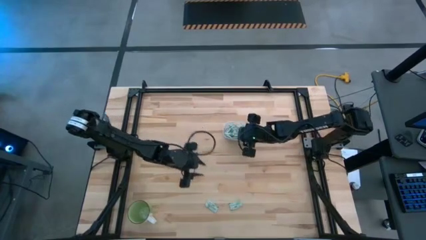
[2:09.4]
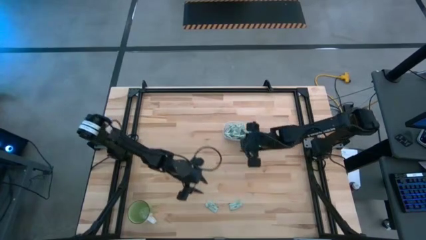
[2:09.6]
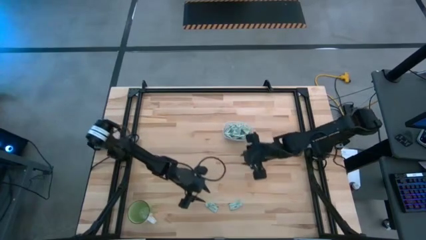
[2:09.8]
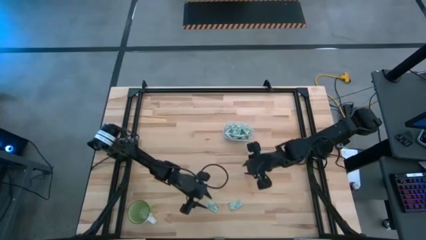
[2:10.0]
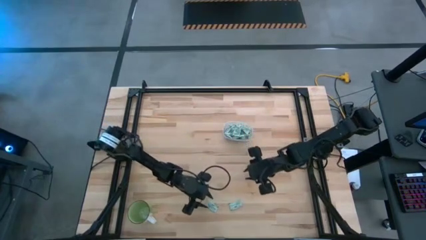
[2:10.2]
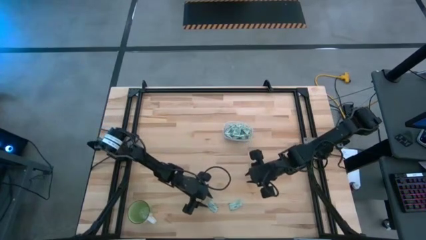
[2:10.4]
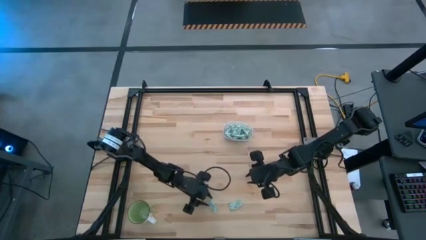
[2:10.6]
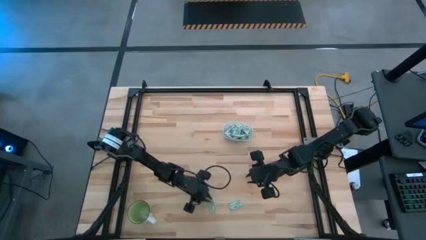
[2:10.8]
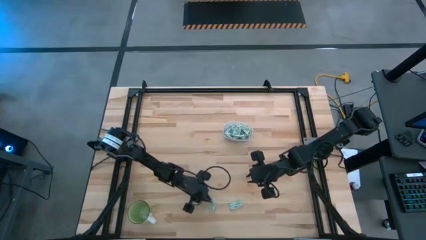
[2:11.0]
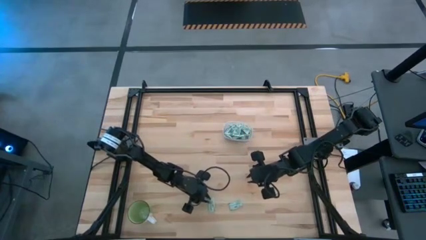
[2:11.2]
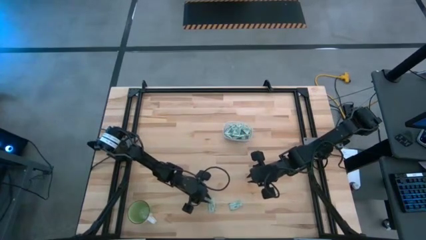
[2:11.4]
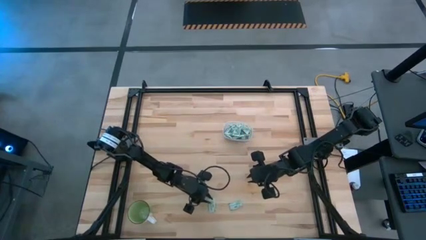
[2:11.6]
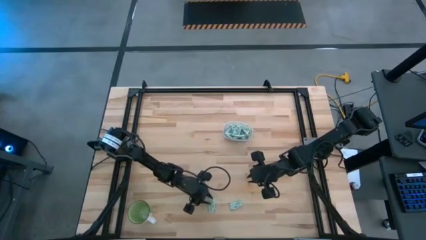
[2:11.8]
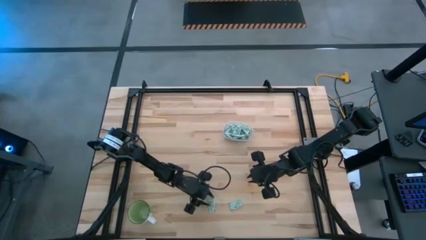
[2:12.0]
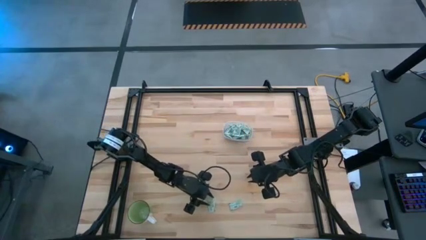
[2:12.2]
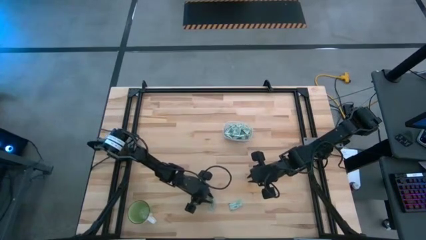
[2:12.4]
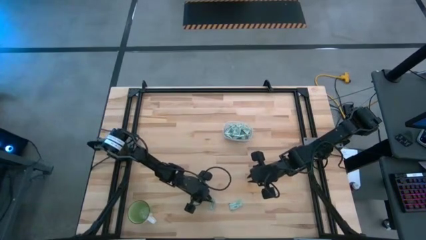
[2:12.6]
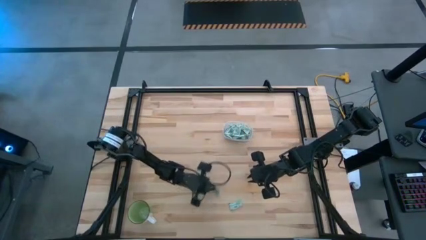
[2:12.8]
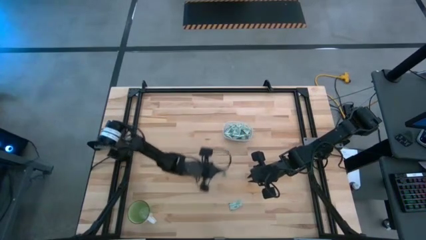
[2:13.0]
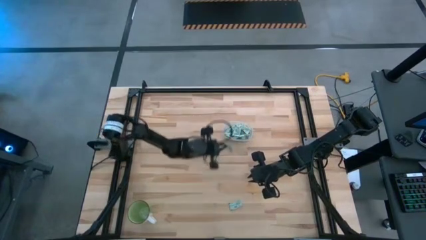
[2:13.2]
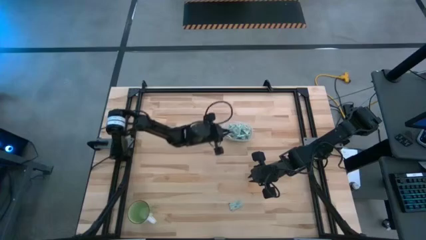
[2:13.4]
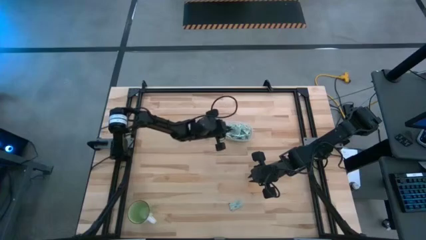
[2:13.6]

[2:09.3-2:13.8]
Task: Pick and place Stevia / Truvia into bins
Put the stevia packet into the transparent bin

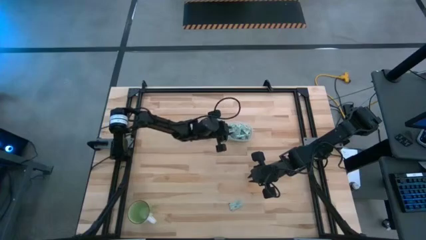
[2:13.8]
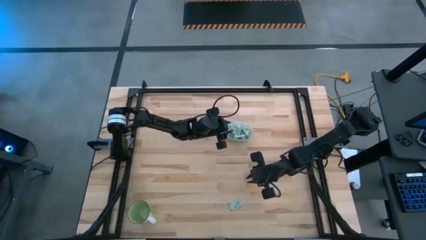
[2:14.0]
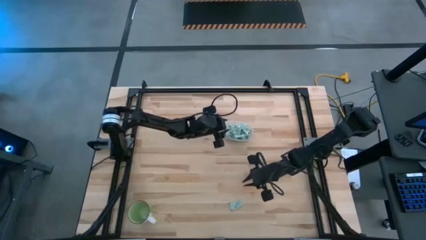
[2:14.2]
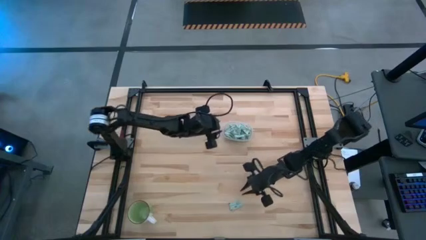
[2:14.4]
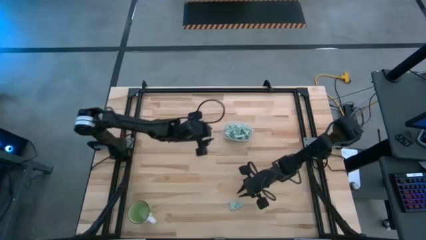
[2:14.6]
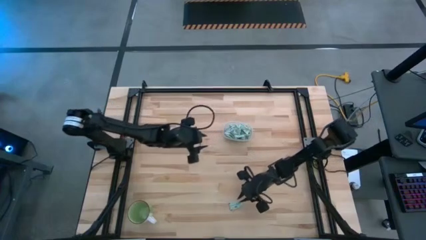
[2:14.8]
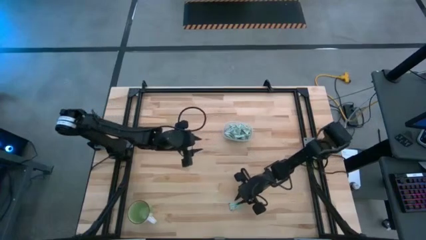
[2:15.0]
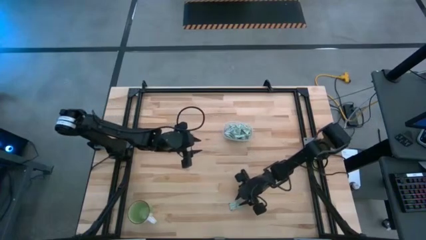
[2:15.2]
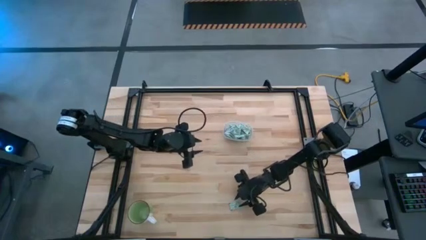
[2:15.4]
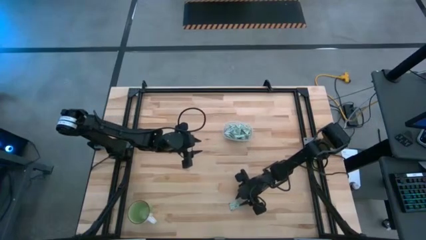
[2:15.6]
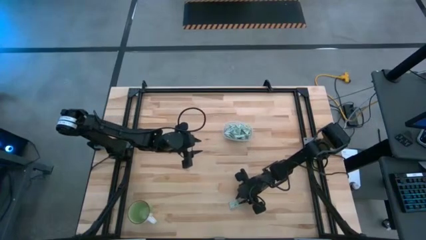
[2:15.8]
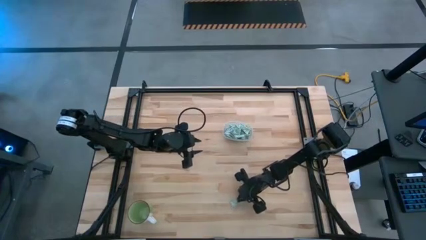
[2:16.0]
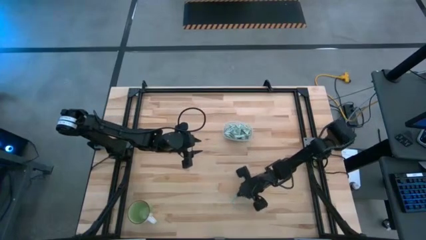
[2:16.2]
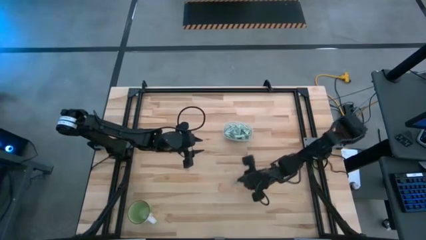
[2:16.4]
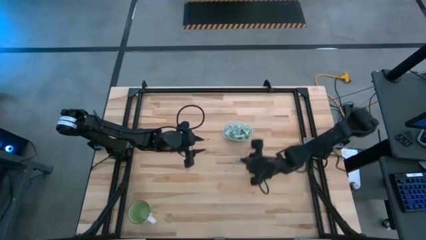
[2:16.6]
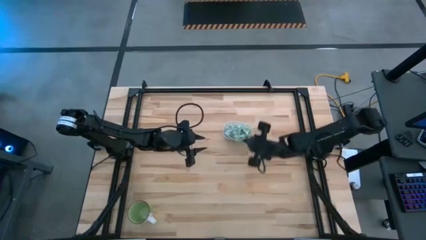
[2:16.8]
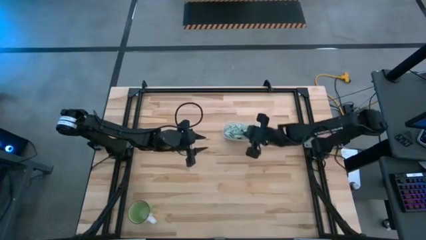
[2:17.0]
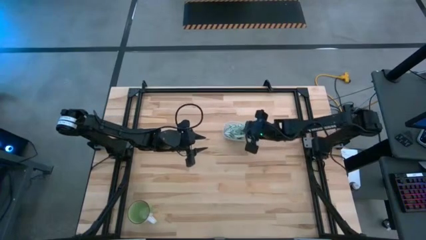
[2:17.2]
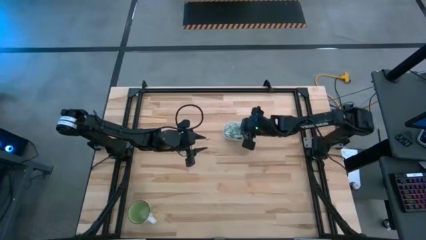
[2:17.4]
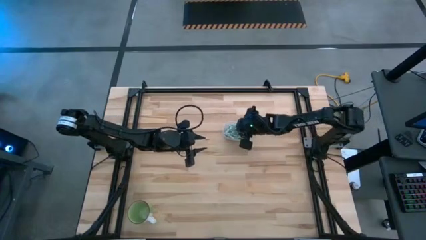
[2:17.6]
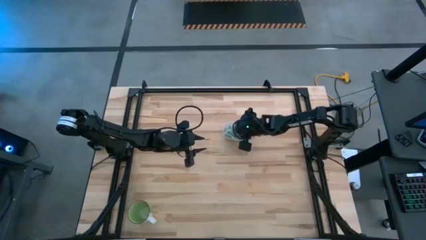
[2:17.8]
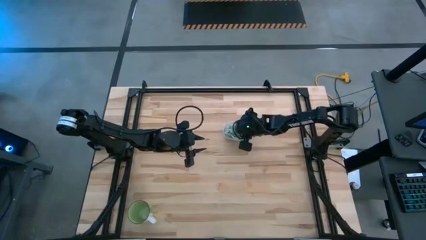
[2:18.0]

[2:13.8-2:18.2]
Put the stevia packet into the transparent bin

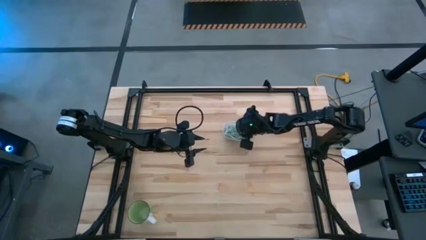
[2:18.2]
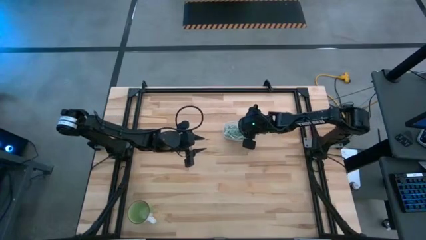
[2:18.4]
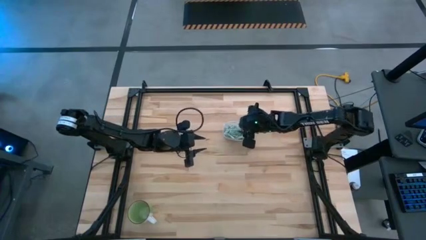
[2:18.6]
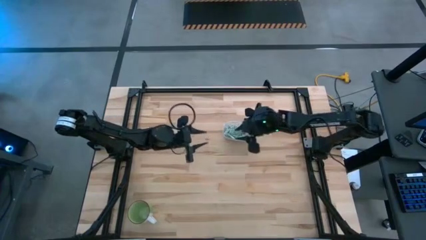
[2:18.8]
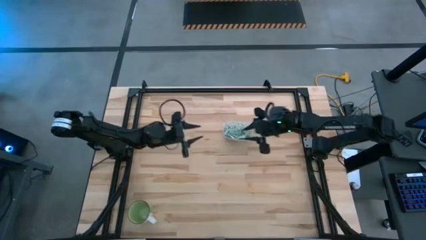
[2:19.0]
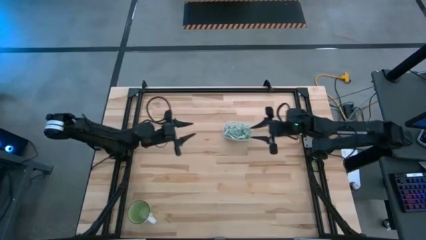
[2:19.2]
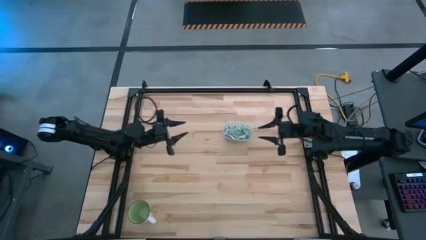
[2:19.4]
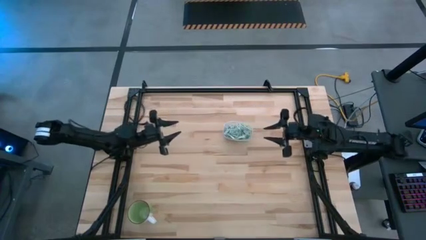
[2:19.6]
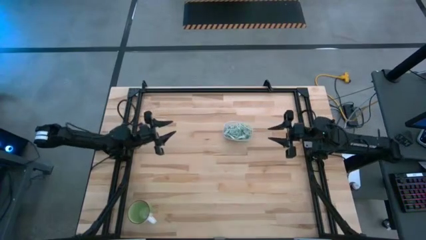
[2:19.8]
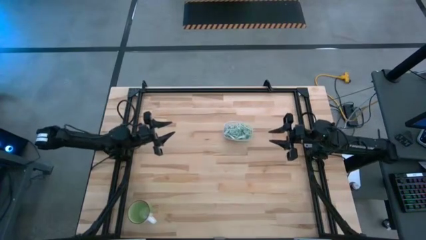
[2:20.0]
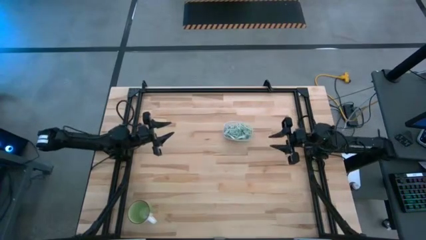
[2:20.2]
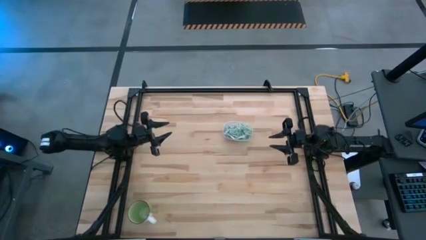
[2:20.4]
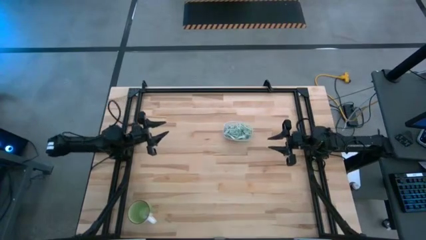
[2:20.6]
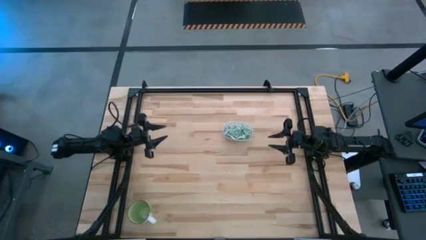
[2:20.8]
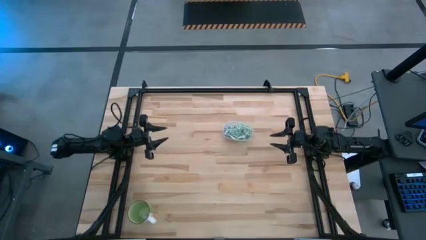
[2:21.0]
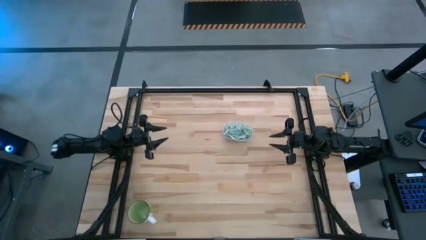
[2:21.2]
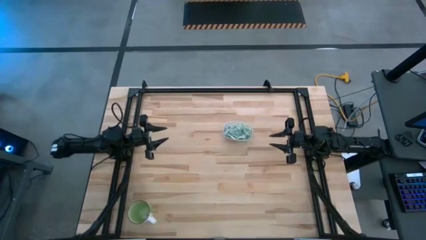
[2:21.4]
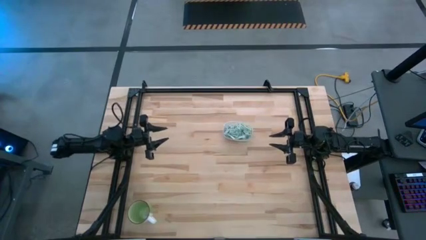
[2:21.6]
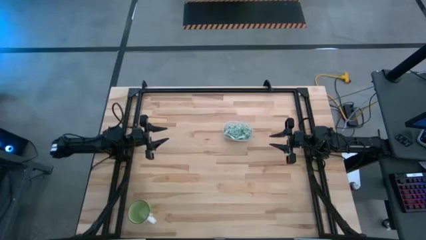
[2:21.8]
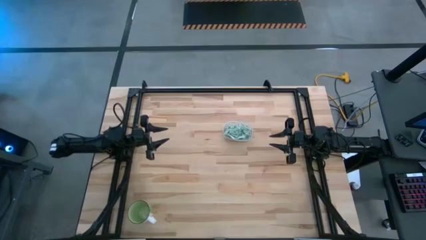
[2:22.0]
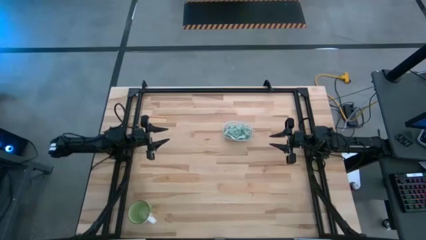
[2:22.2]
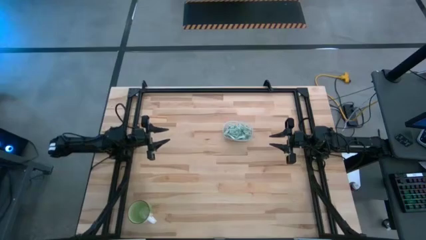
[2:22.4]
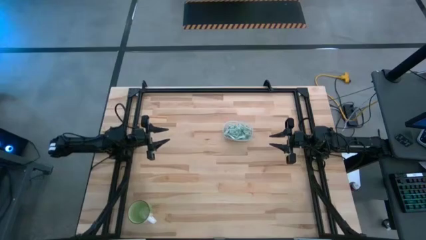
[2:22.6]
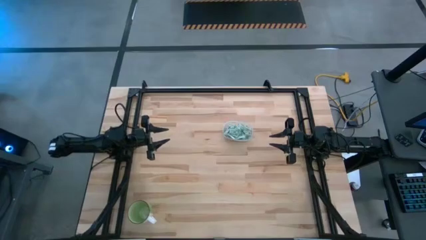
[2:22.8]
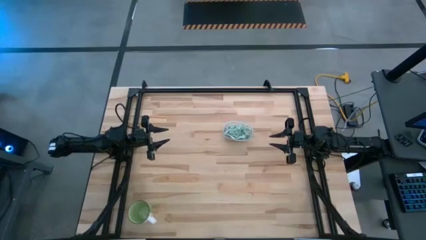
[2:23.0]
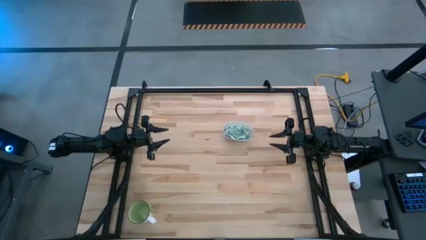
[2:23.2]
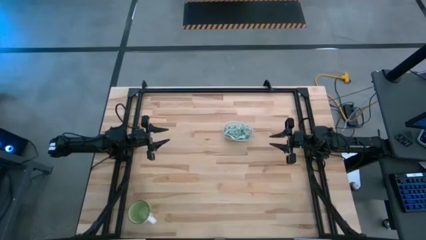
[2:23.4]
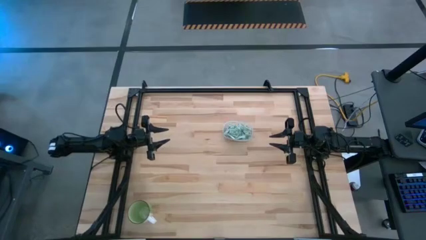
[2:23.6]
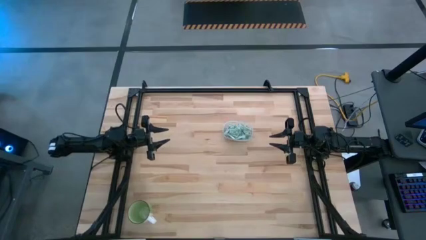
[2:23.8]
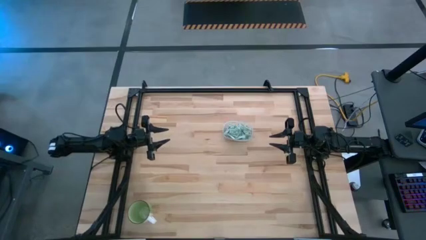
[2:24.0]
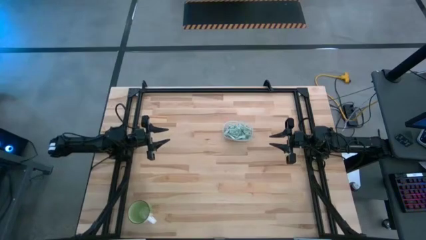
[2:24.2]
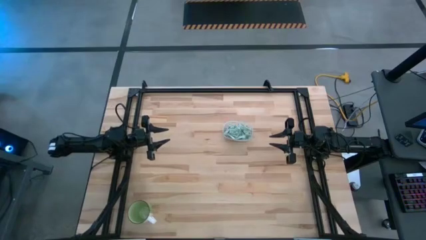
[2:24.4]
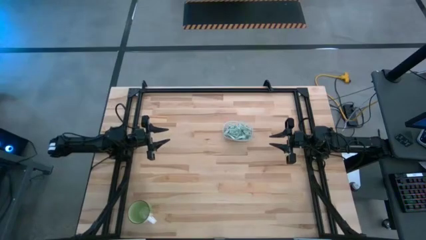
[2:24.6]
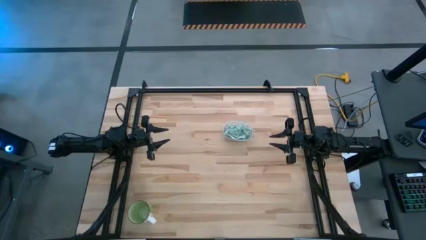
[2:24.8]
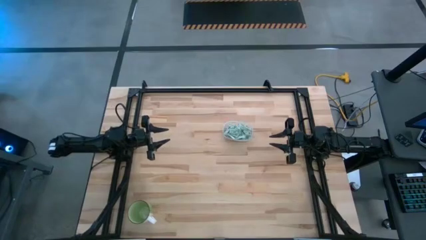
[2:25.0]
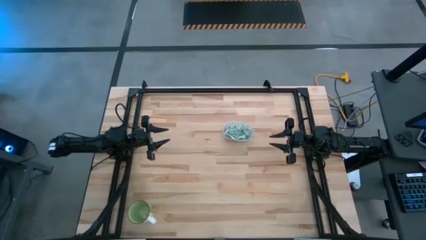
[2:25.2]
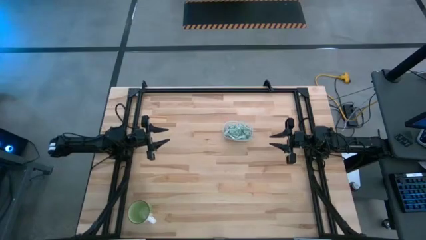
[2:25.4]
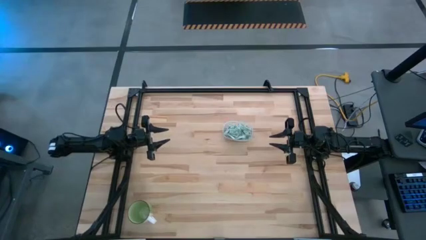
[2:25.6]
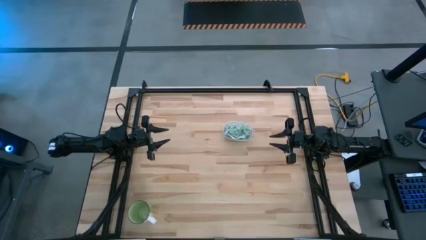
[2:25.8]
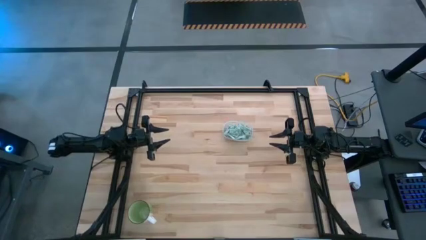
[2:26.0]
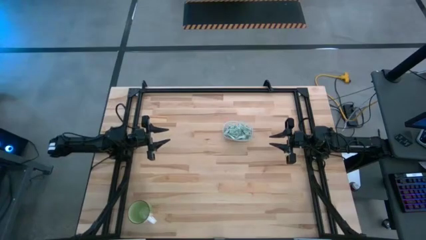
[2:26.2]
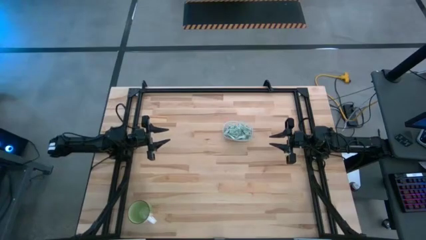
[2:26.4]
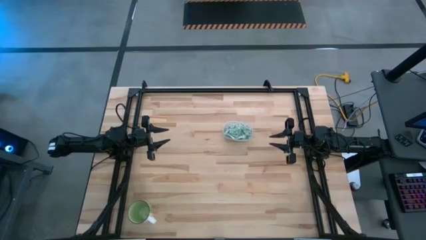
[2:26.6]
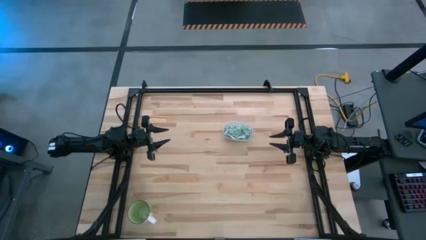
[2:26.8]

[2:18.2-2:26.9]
Return to Home Position
